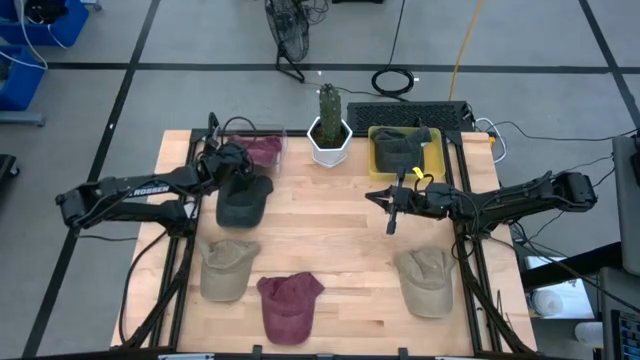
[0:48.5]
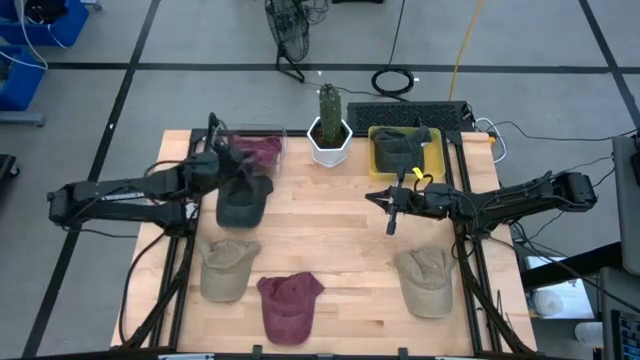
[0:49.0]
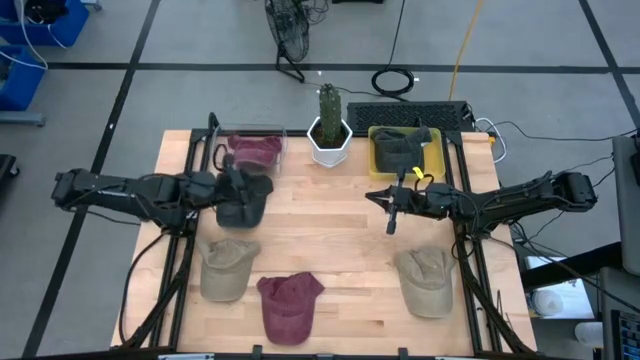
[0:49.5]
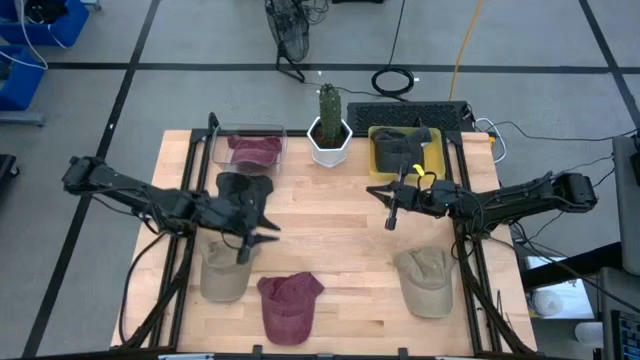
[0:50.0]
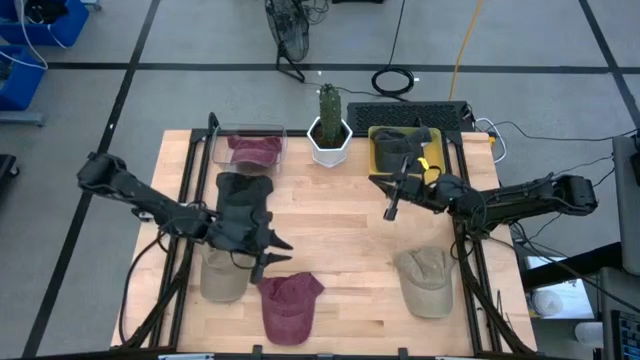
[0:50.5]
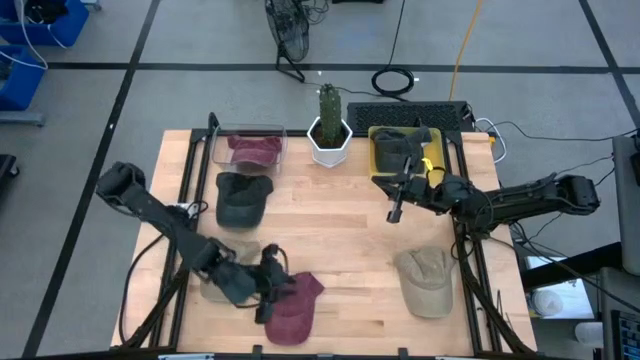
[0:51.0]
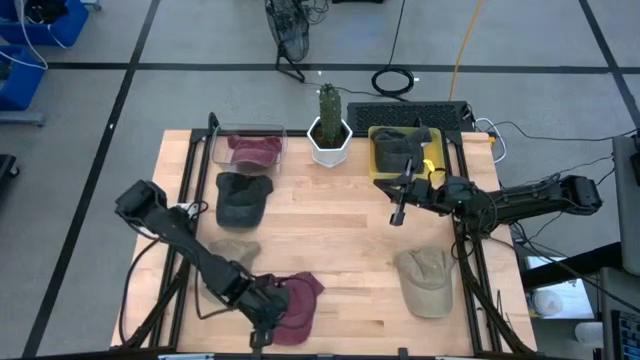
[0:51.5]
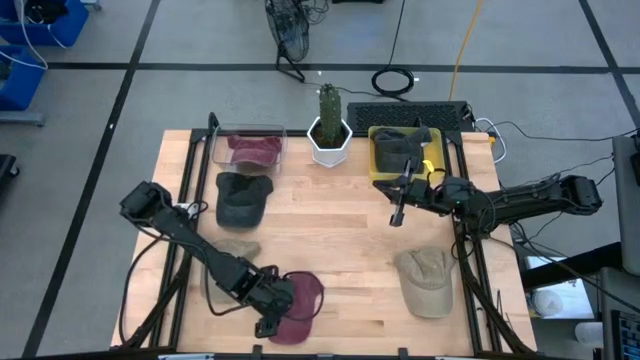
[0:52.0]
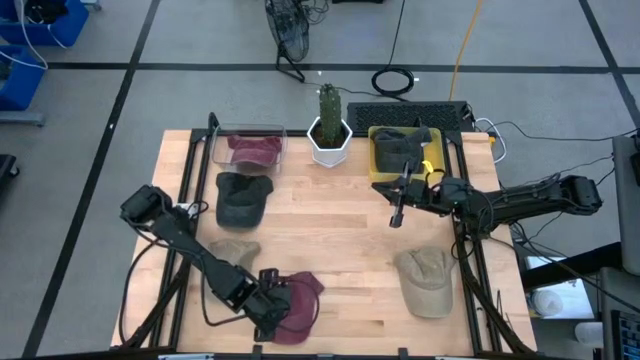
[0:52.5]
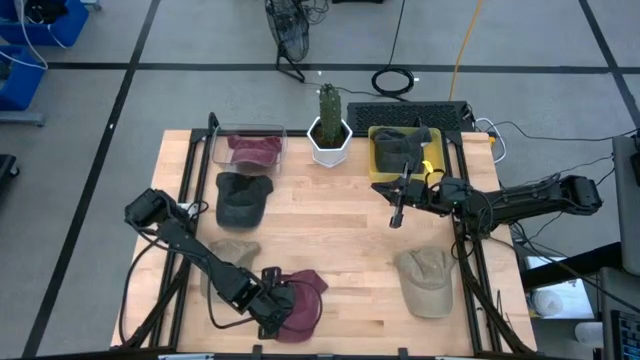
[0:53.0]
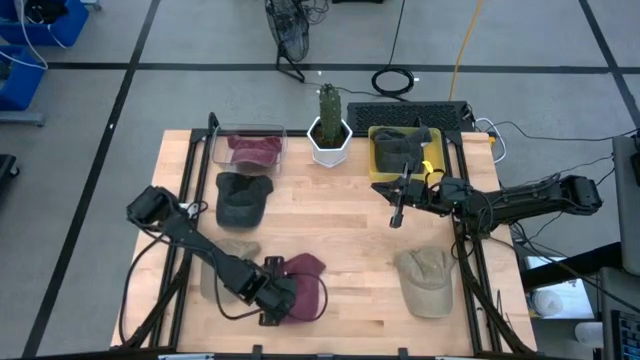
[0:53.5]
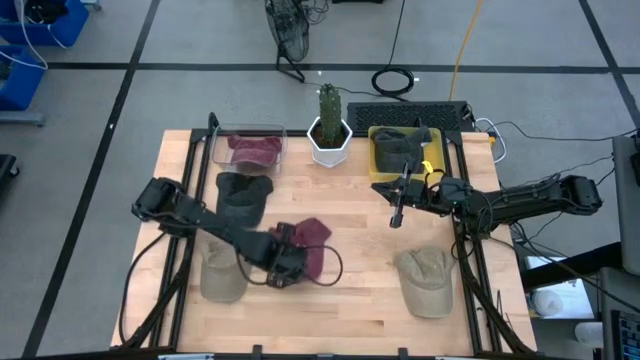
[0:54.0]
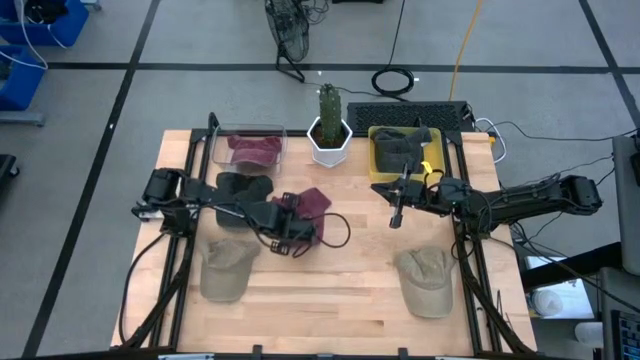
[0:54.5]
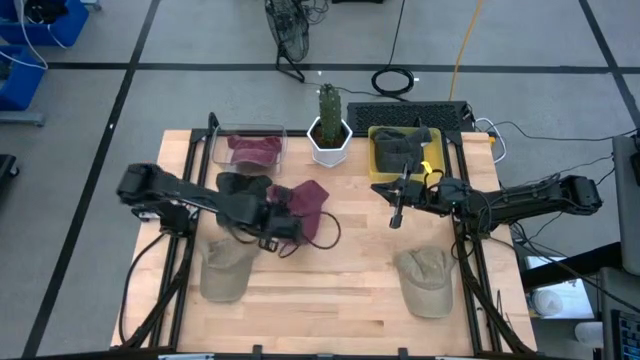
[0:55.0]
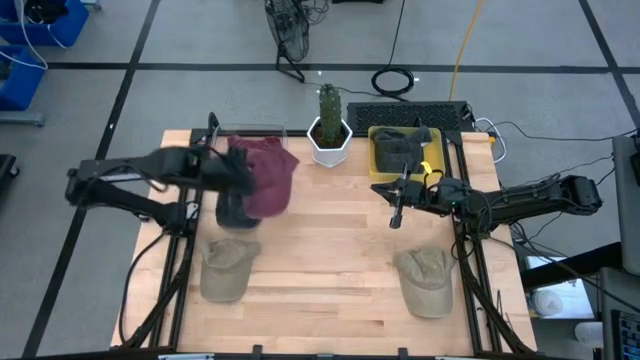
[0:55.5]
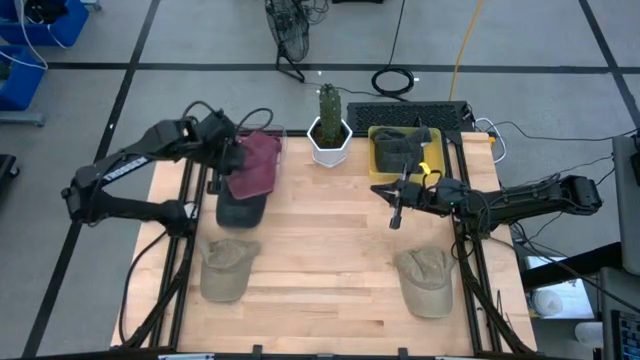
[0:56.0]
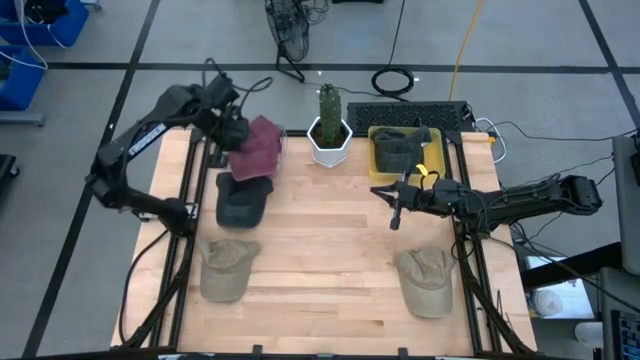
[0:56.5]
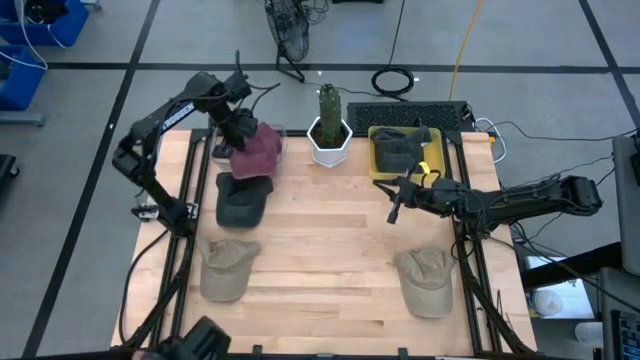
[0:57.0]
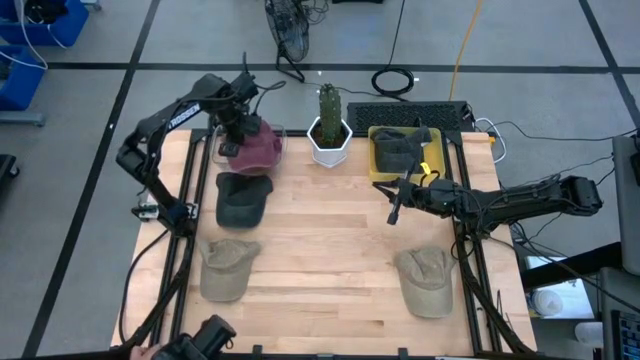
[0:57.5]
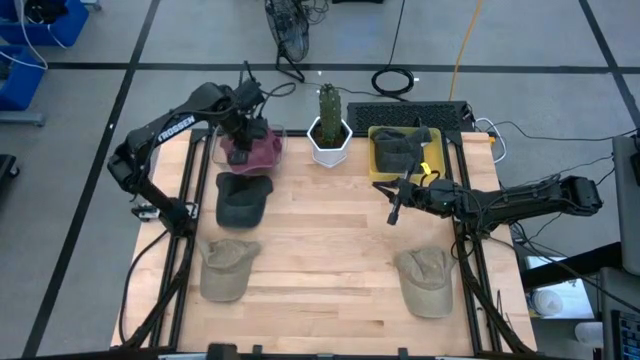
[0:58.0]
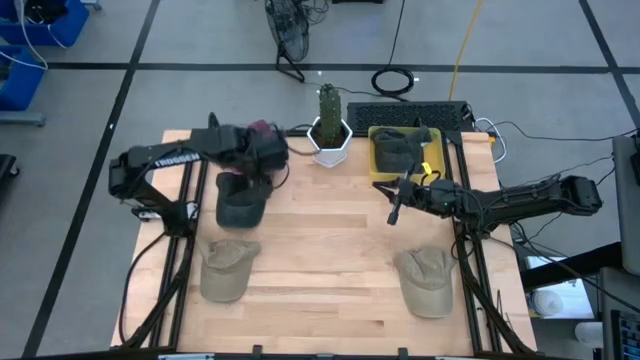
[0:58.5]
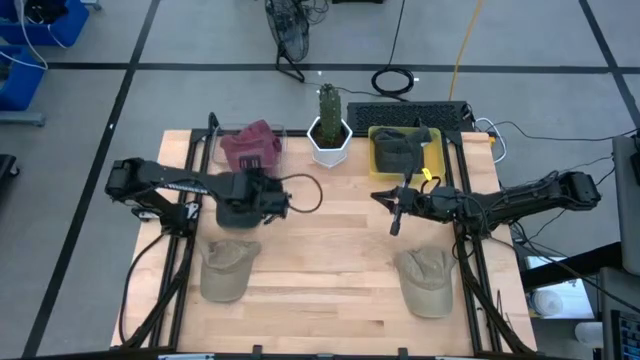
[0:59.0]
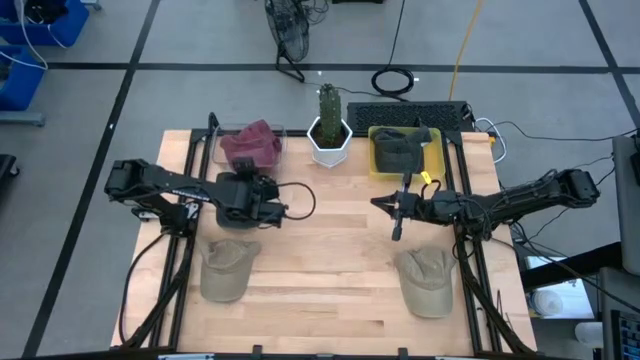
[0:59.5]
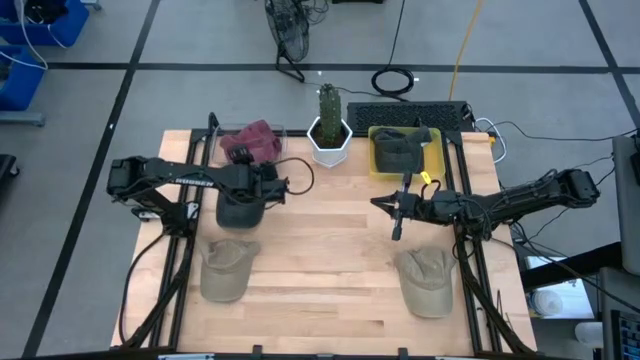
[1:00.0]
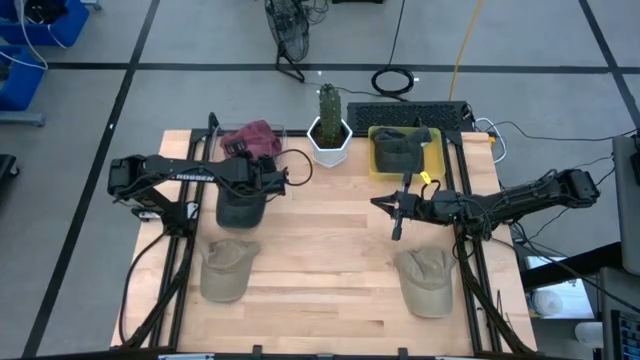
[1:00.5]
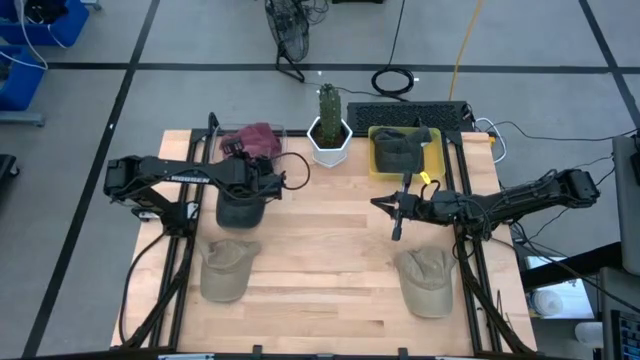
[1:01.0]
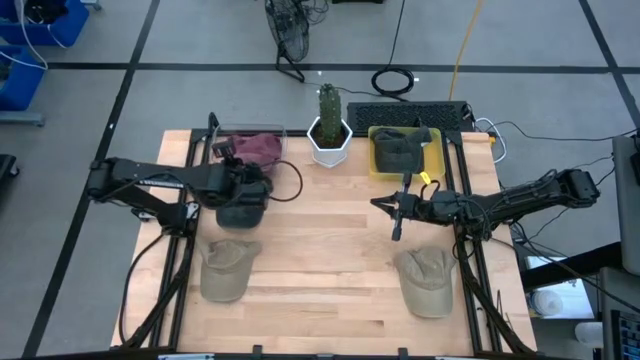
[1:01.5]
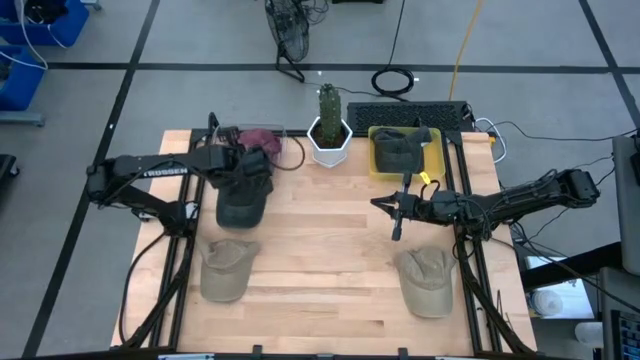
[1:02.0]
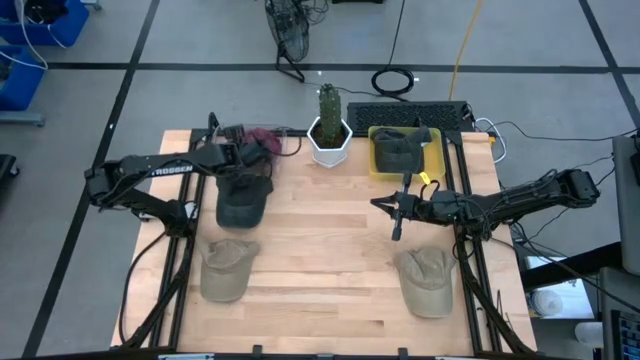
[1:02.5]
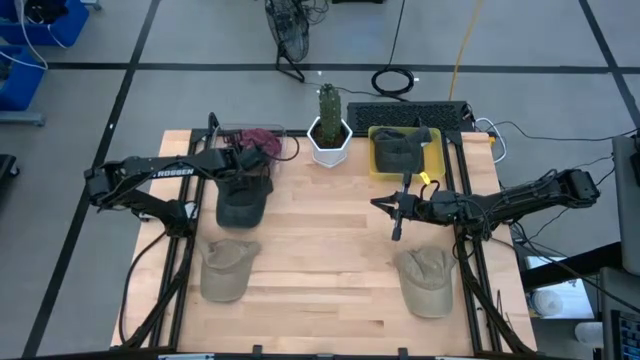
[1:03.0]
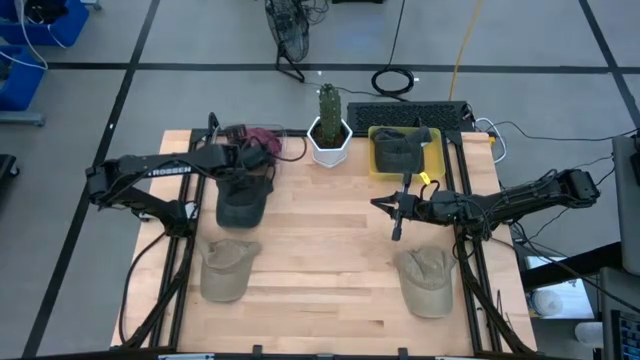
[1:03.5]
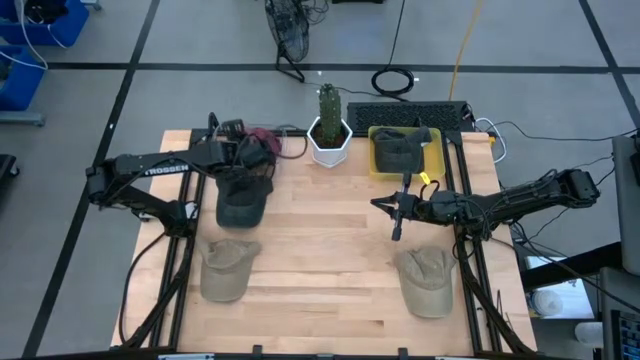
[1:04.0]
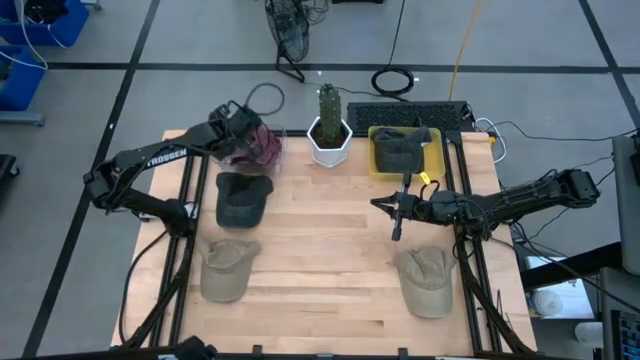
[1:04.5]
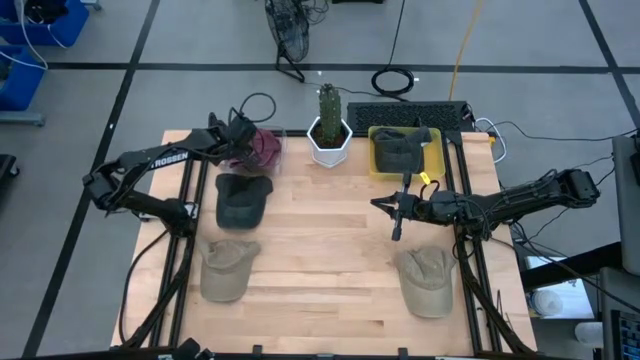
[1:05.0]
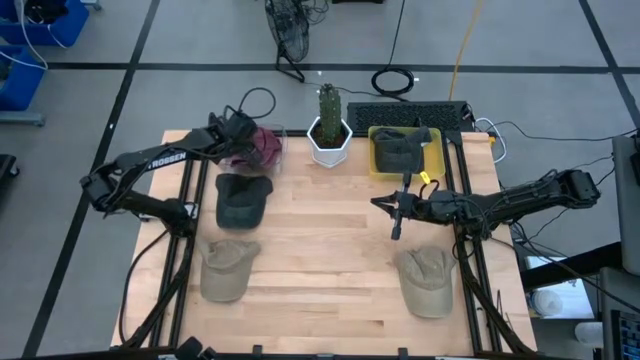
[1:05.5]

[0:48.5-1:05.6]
Task: Pick & Place hat
Put the red cap into the transparent bin

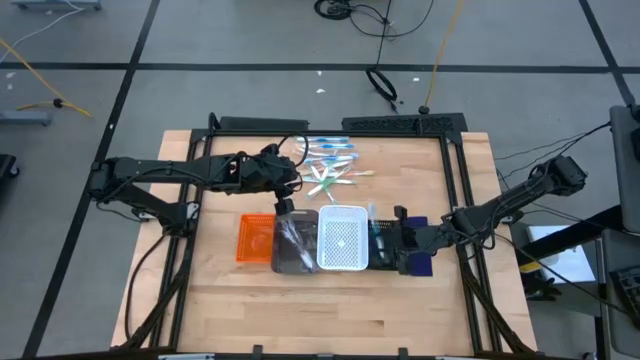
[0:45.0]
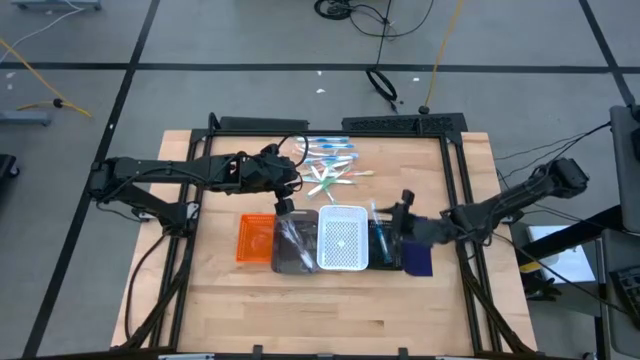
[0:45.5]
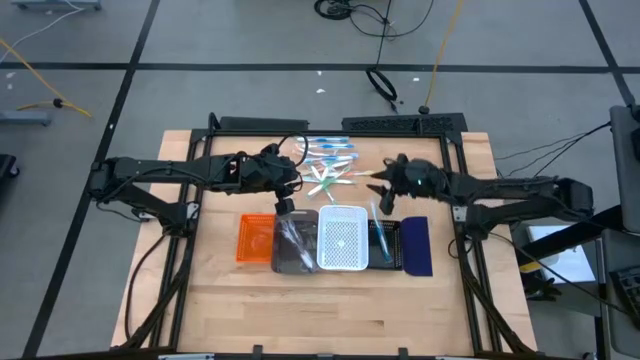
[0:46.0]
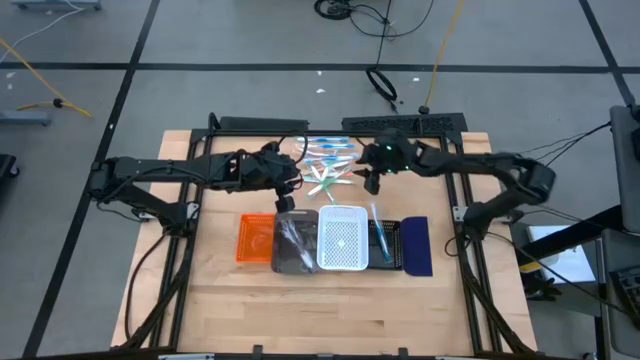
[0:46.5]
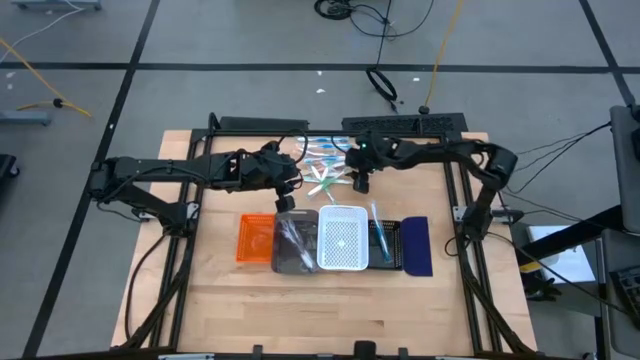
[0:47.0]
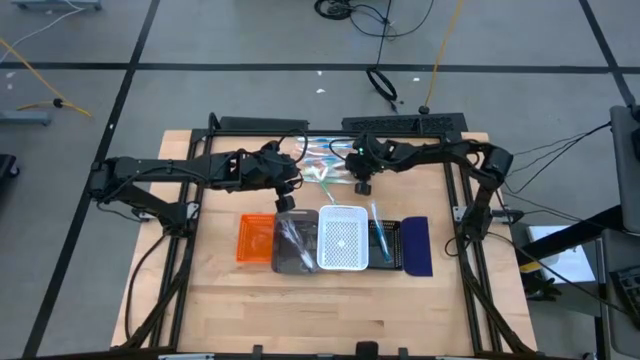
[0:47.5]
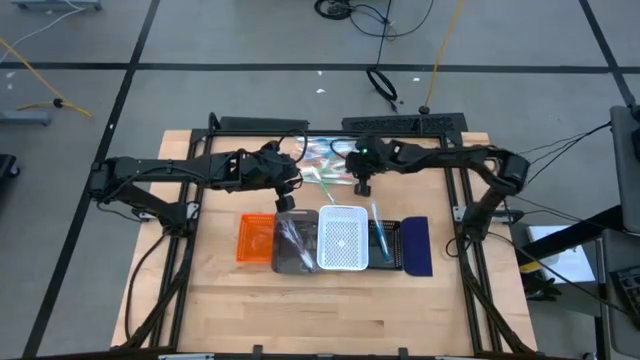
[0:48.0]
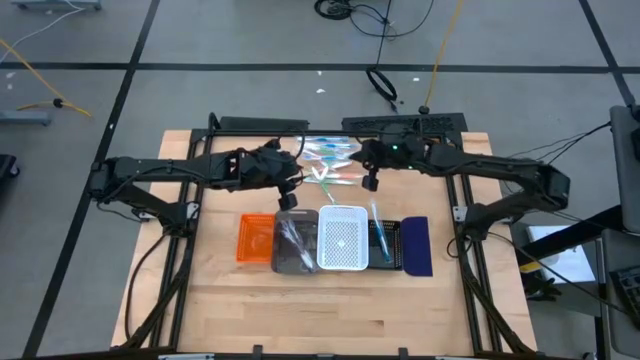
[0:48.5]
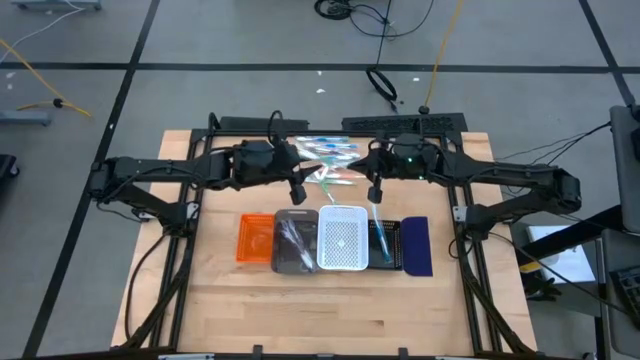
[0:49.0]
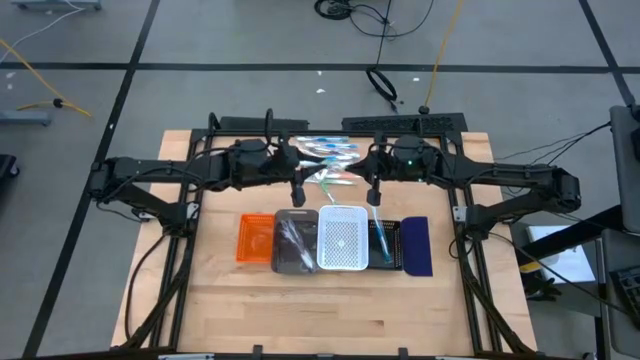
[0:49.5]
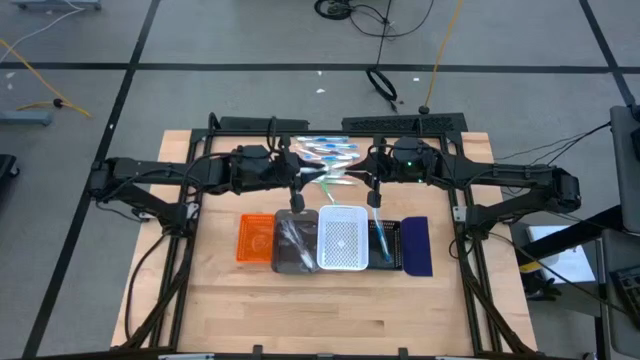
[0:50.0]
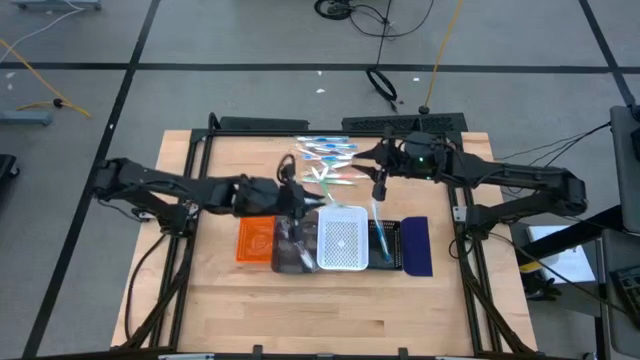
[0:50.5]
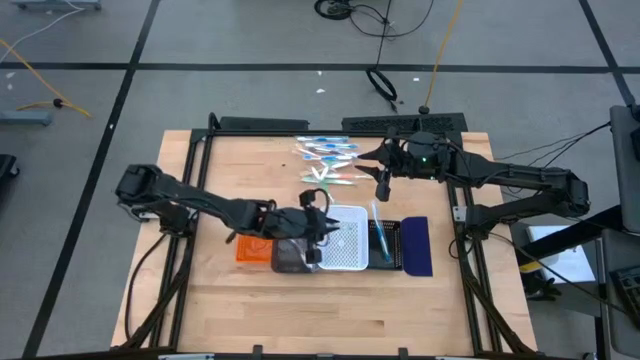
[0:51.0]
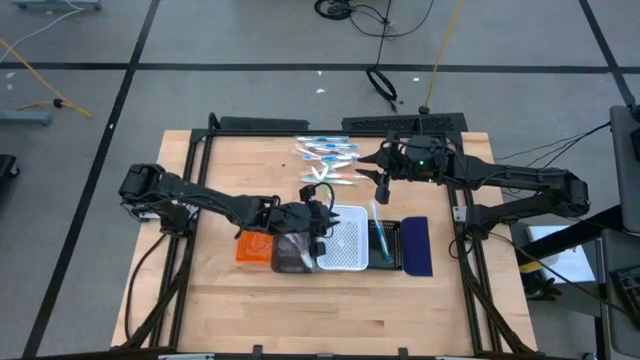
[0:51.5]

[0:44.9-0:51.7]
Task: Pick & Place Toothbrushes
Put the green toothbrush into the white bin
